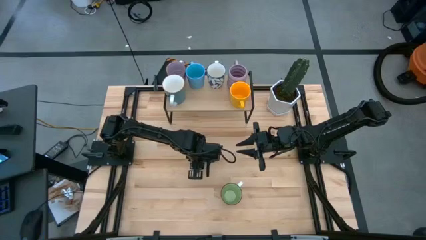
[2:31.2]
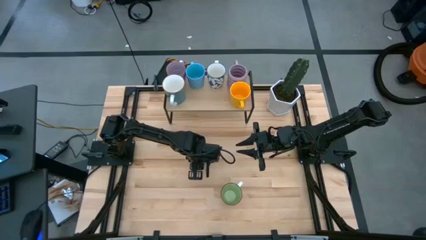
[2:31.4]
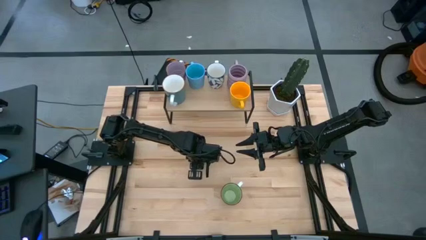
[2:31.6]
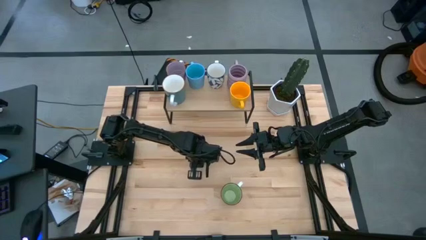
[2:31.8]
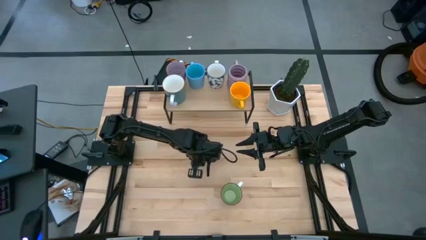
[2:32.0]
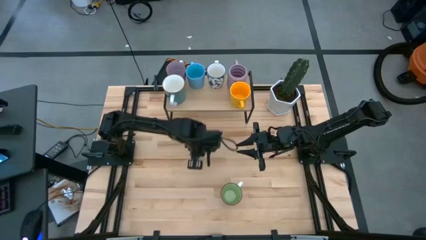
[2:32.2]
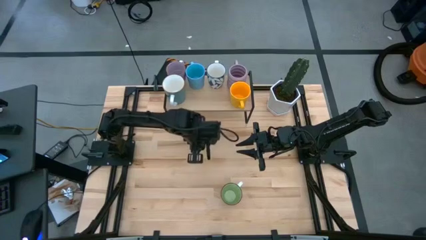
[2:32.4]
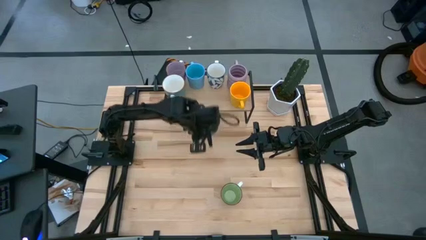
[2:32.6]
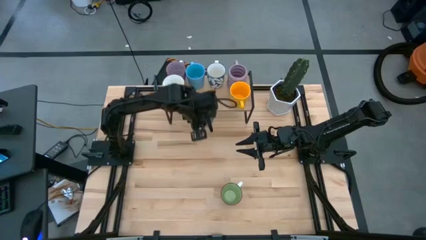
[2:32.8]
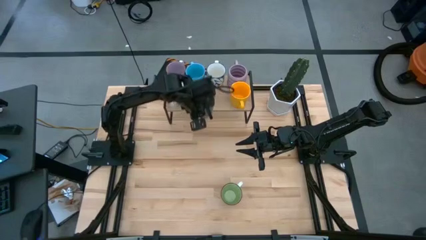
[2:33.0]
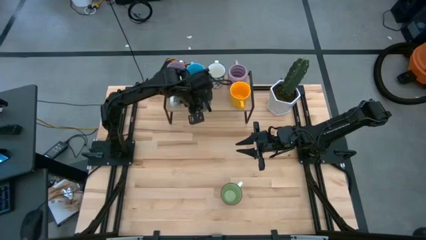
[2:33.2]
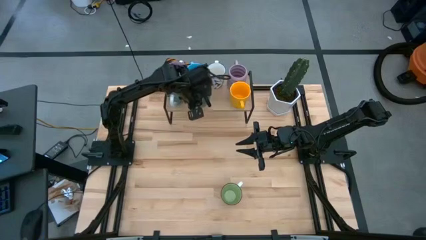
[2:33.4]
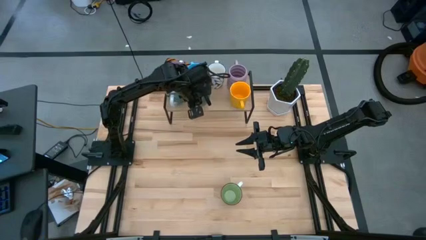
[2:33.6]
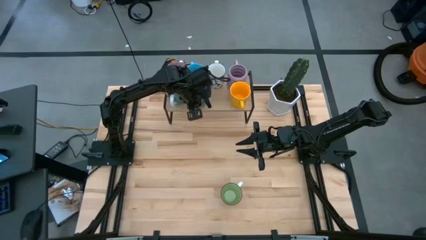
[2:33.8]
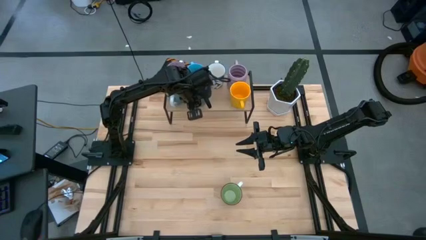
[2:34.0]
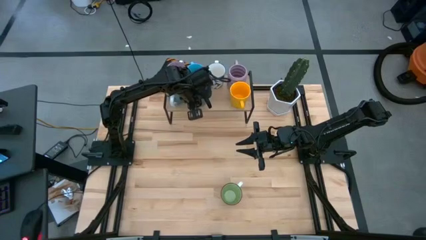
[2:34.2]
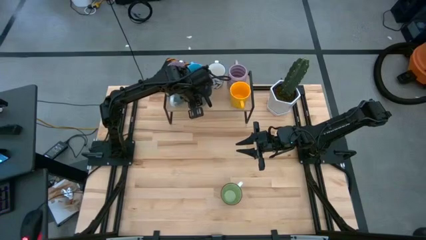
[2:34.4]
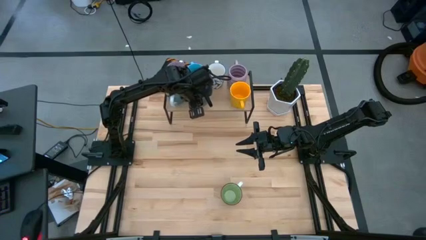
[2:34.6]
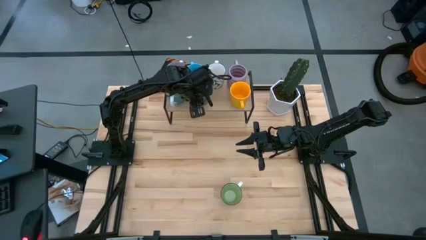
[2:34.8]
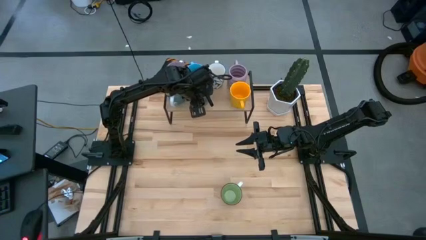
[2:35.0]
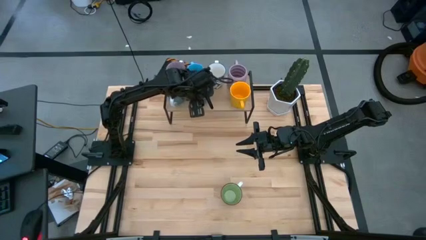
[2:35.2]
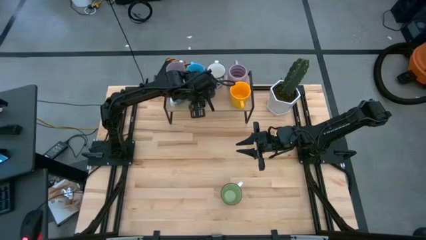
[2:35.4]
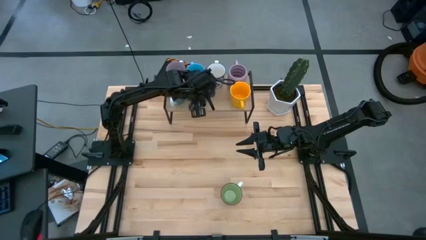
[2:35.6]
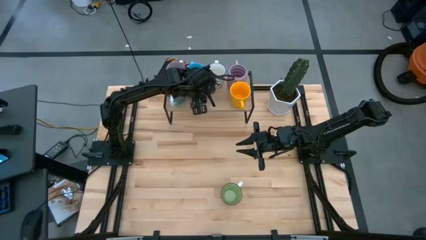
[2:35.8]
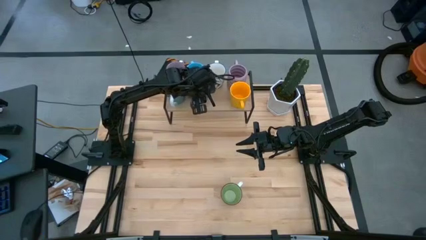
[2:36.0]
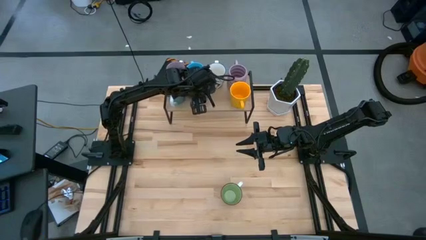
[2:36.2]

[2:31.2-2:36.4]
Task: Place coffee mugs
Put the dark blue mug on the shelf

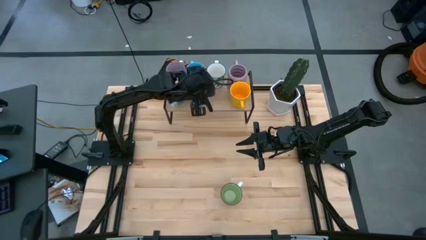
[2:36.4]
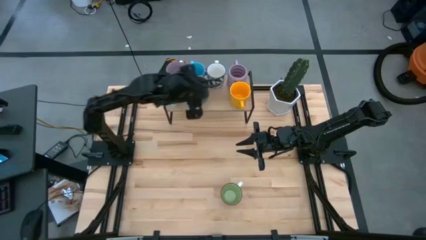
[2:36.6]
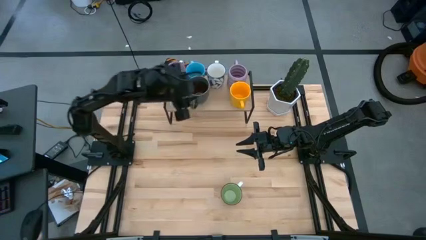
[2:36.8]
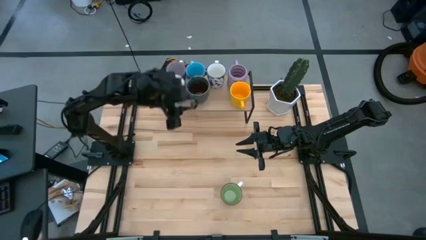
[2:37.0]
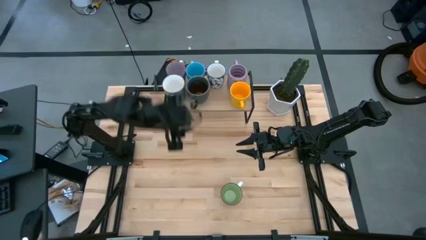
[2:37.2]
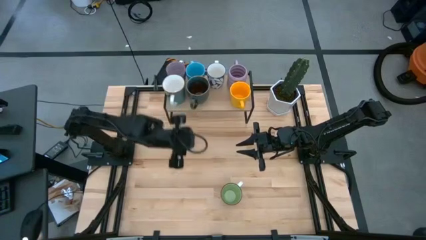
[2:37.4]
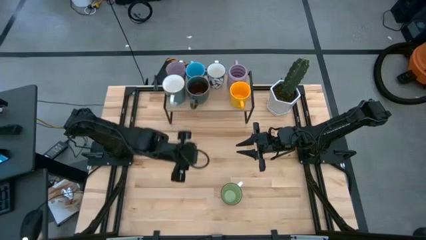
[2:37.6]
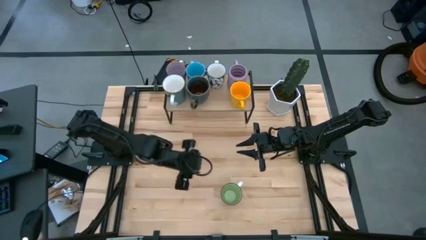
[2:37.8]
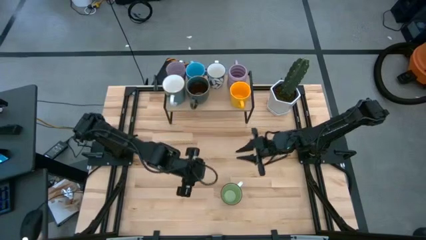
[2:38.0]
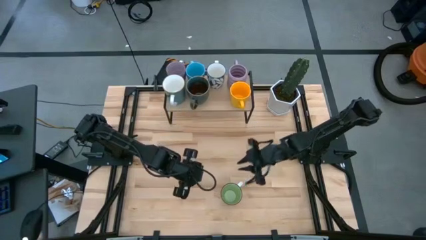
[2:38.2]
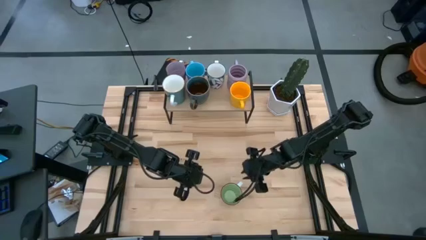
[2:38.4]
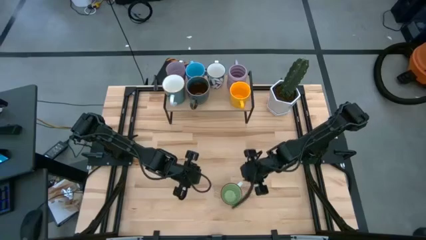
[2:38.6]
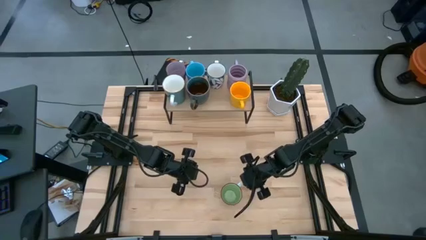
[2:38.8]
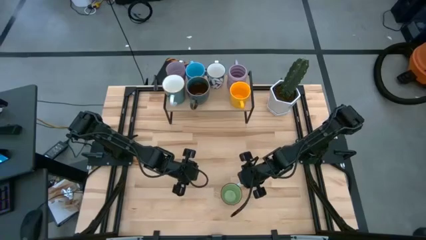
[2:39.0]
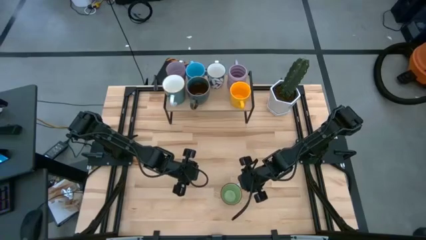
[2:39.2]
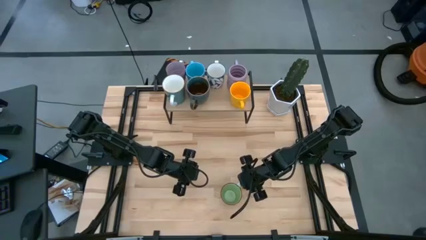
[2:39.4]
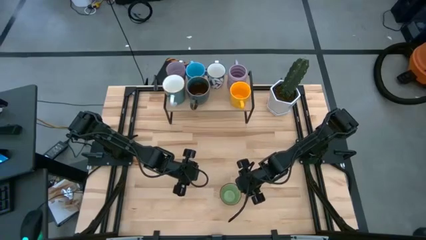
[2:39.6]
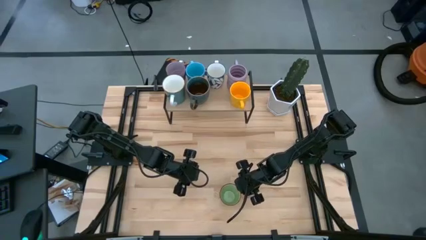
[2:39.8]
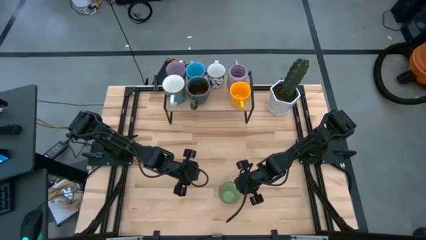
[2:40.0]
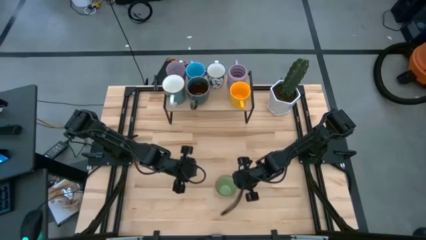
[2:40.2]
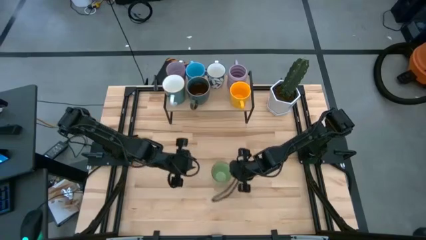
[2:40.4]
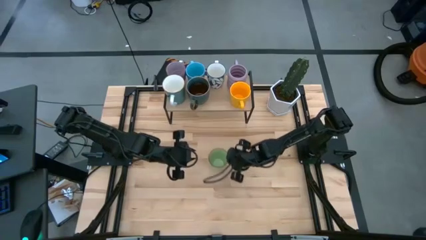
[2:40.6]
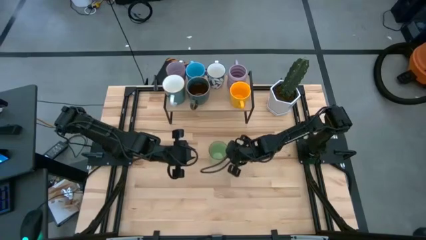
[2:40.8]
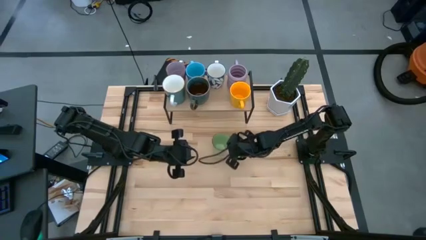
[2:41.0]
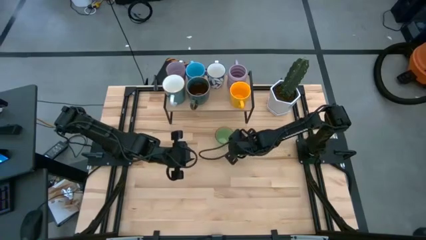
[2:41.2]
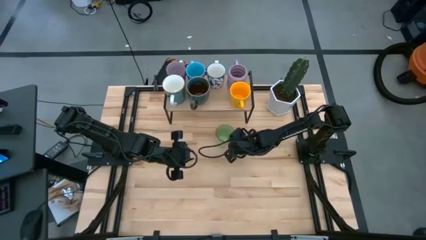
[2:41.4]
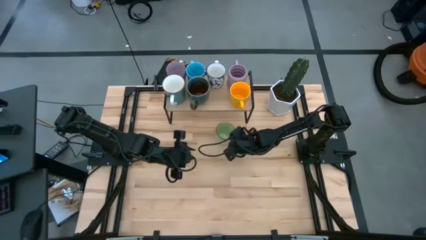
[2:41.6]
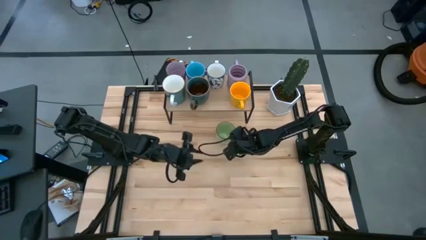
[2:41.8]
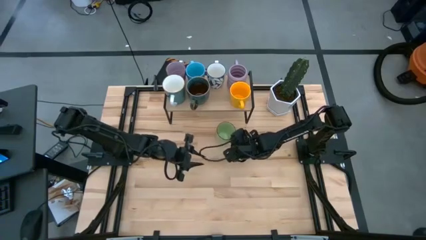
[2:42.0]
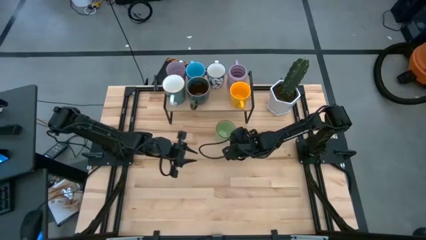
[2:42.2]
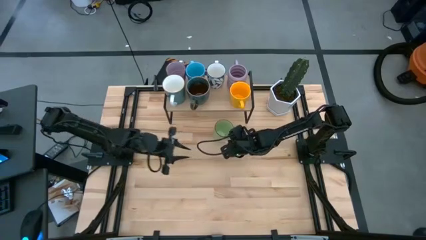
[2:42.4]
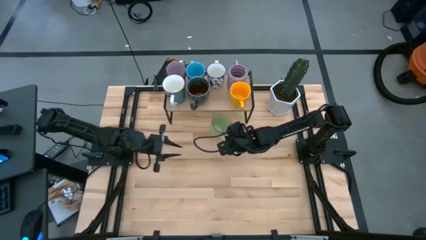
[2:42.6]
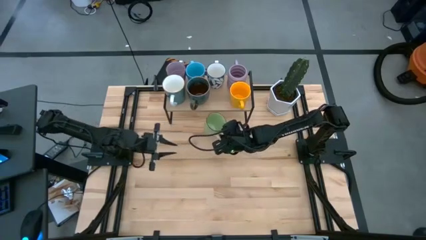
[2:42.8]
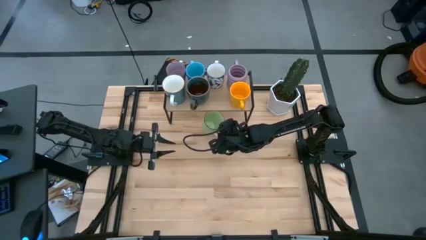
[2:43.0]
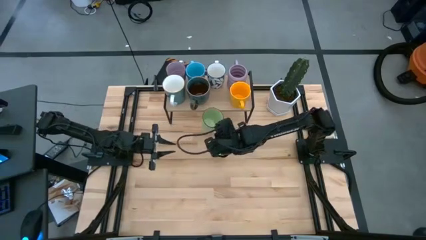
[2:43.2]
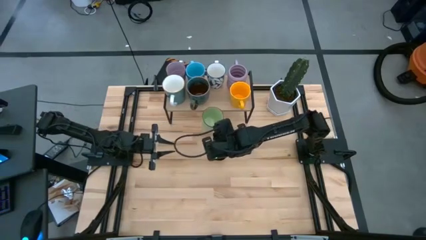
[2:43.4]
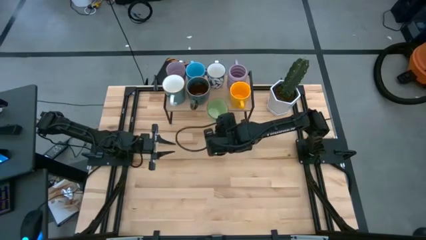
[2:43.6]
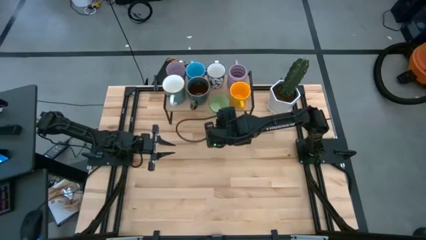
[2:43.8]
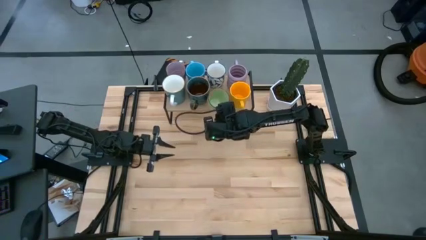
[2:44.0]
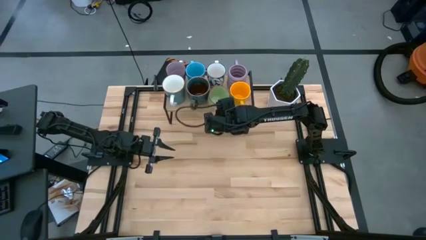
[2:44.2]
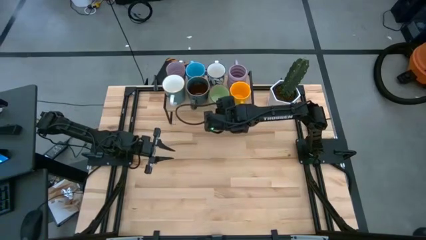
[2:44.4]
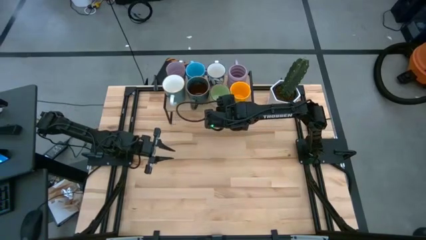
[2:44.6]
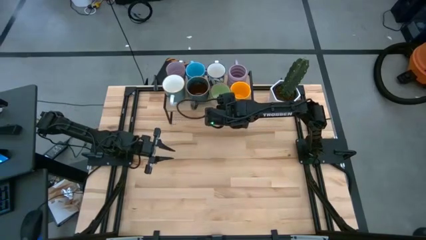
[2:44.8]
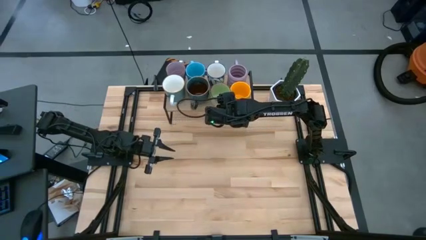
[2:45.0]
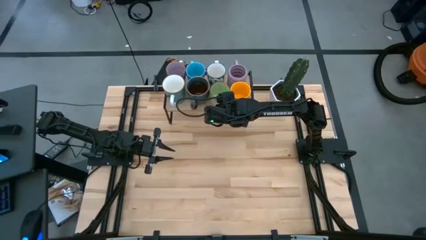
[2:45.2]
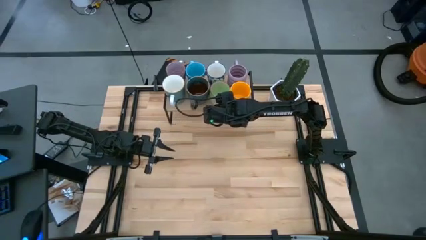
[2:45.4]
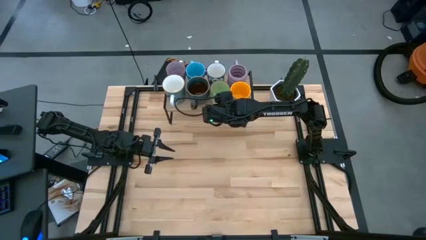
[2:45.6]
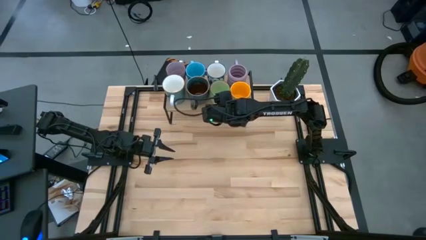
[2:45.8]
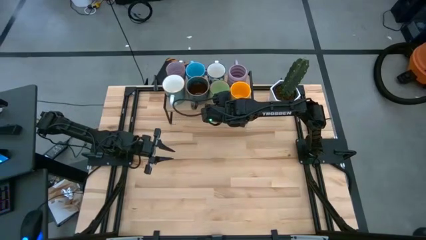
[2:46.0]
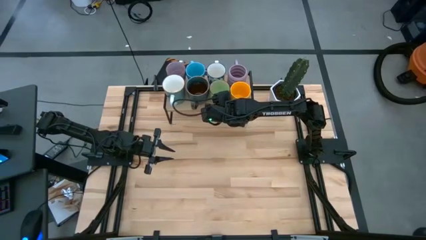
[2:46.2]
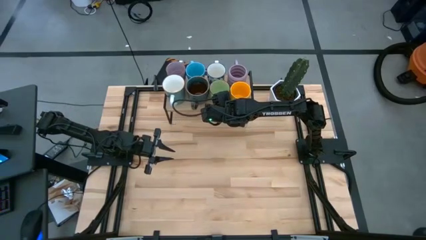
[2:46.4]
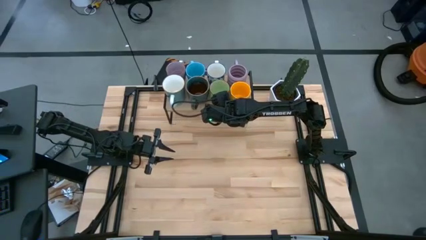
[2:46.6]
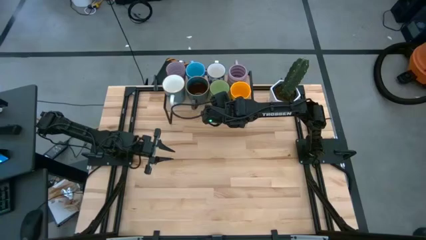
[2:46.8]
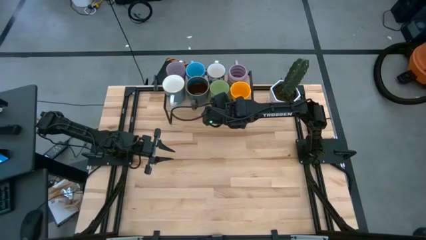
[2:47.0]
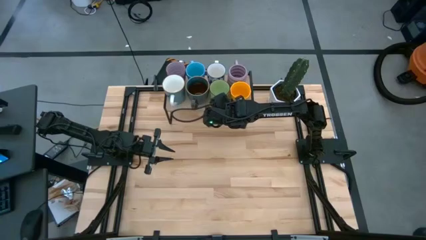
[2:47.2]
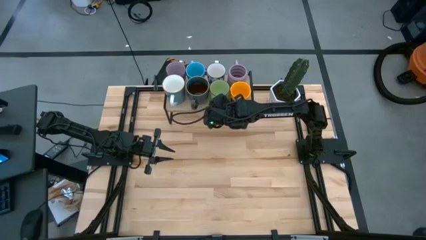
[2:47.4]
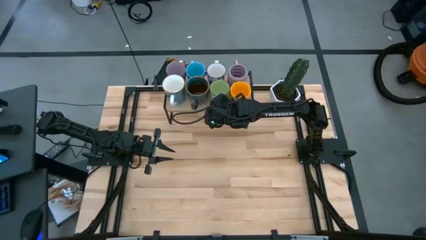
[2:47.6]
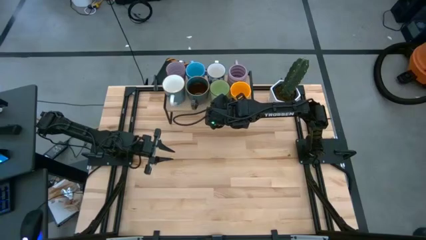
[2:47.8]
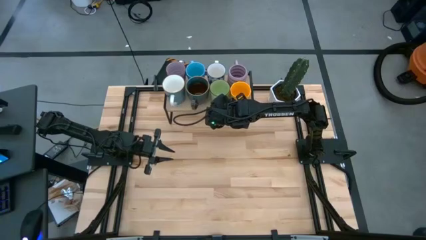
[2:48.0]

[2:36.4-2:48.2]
Put the light green mug on the shelf
